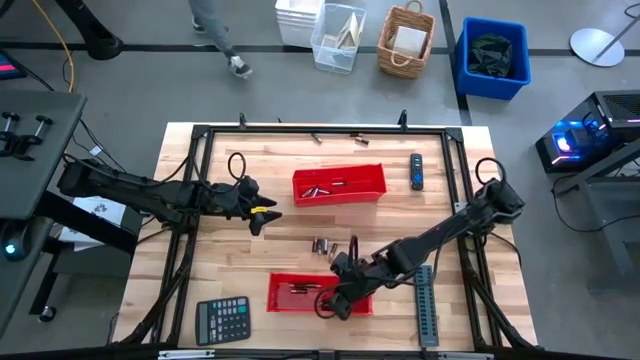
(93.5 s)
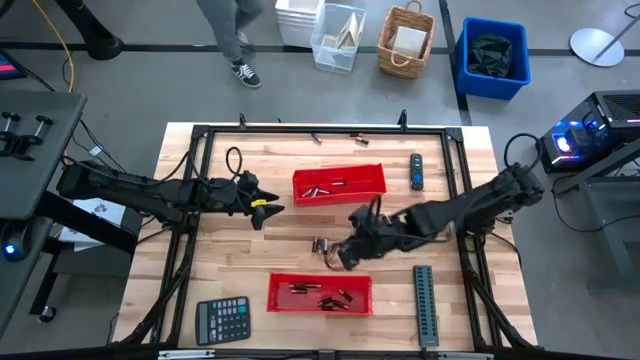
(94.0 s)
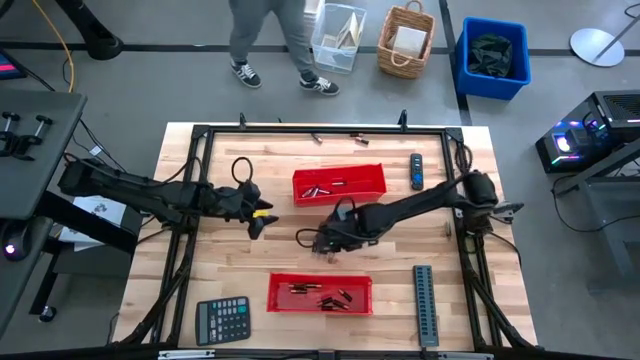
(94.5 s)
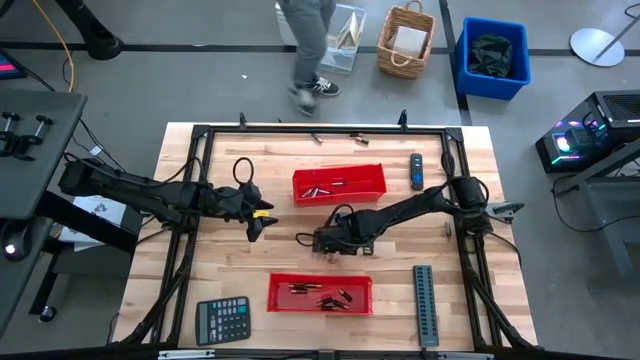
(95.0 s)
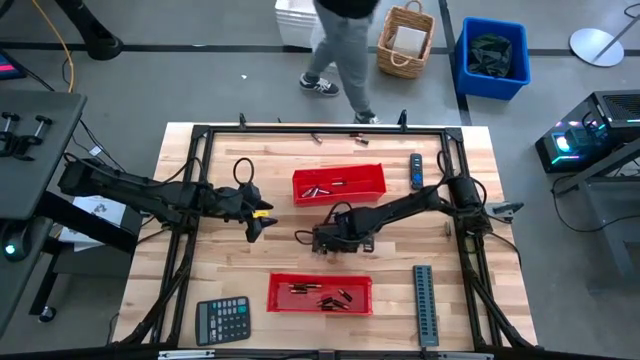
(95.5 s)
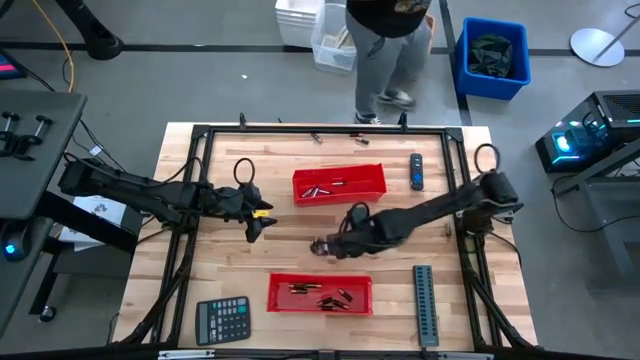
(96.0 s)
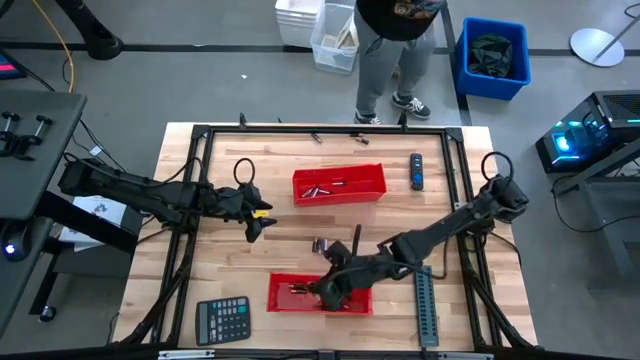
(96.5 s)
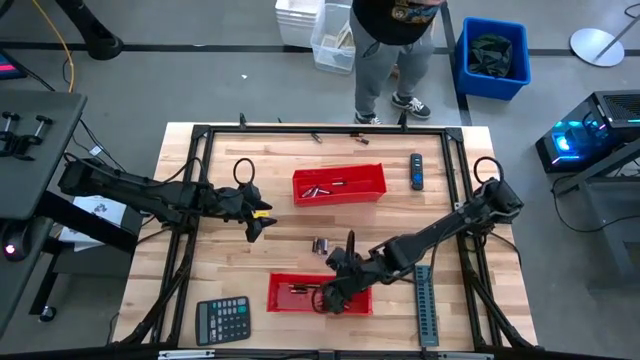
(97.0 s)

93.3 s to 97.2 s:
Task: Sort batteries
Put the black battery into the bottom red bin

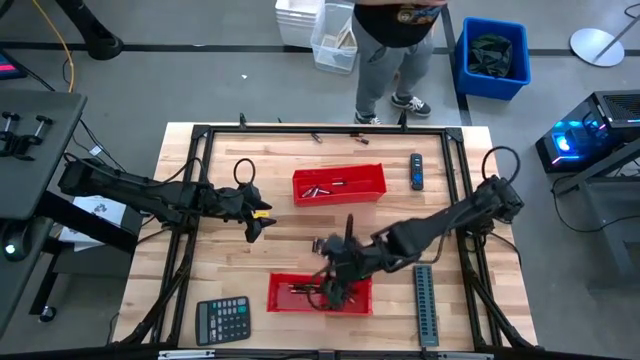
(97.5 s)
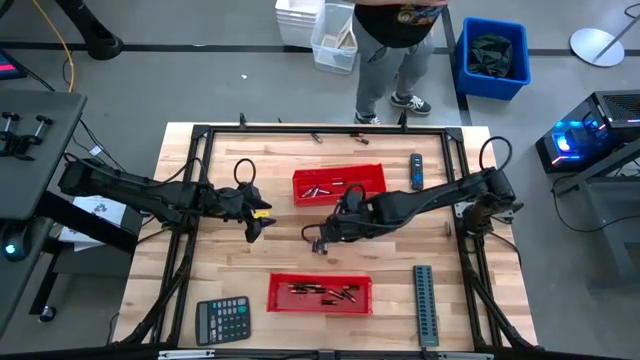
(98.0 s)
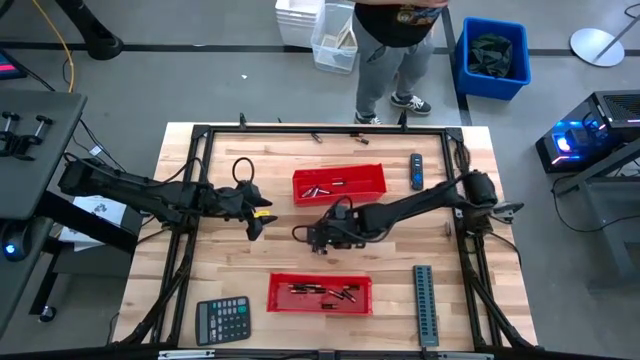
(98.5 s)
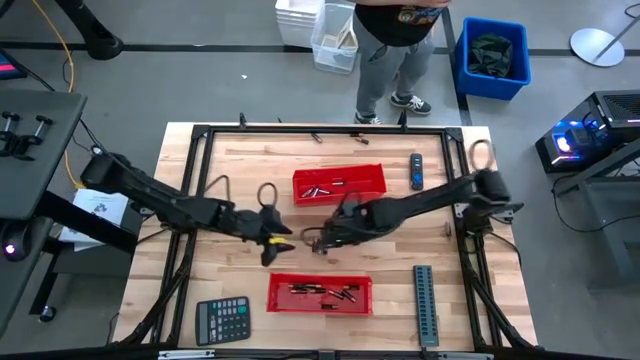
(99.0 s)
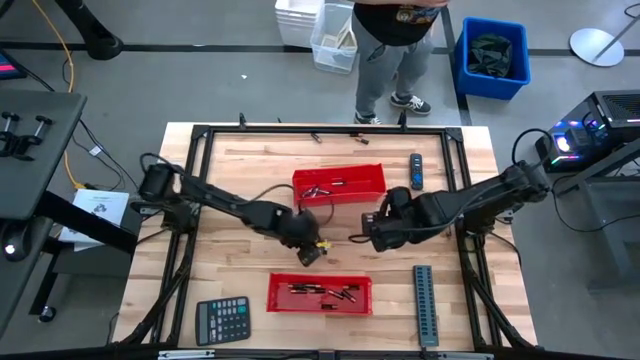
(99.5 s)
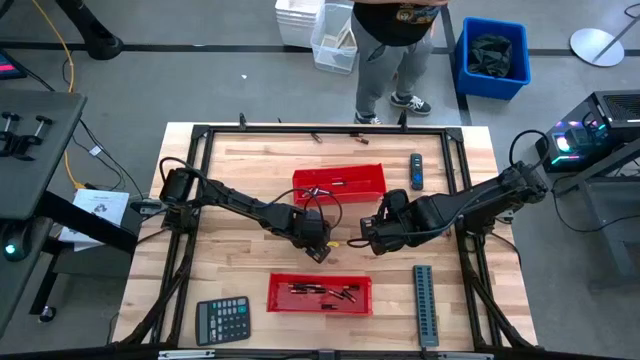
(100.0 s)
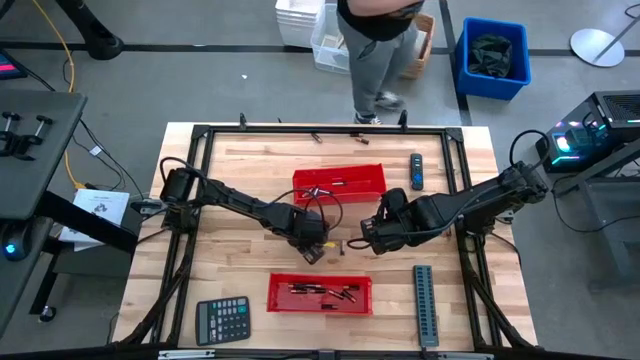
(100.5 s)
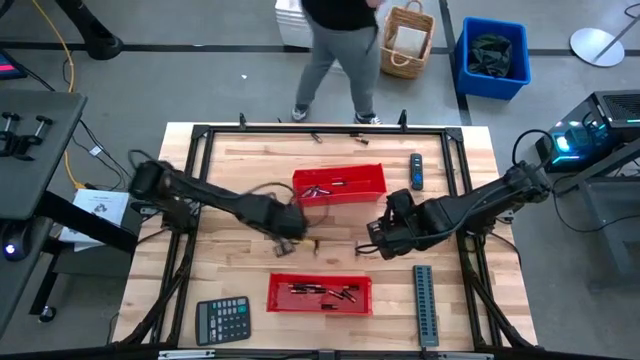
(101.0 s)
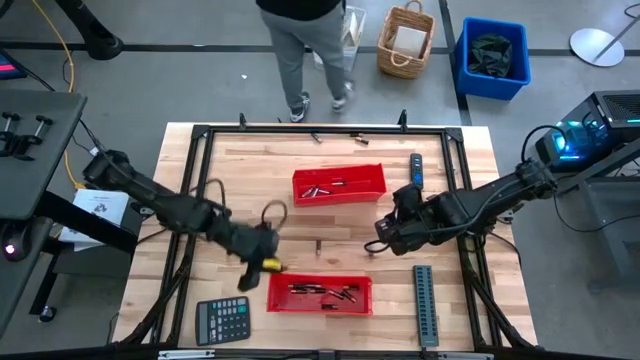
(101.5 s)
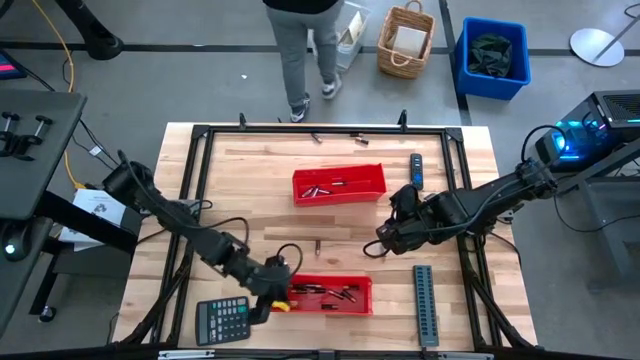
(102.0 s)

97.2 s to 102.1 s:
Put the black battery into the bottom red bin

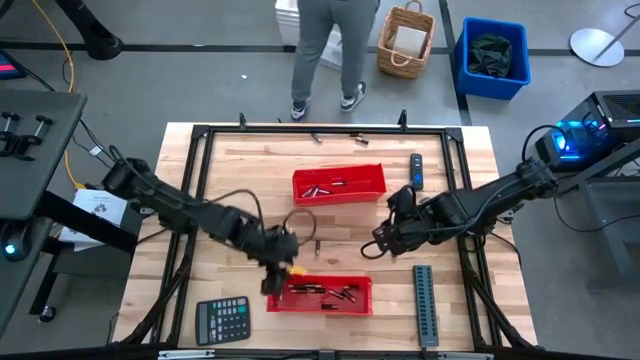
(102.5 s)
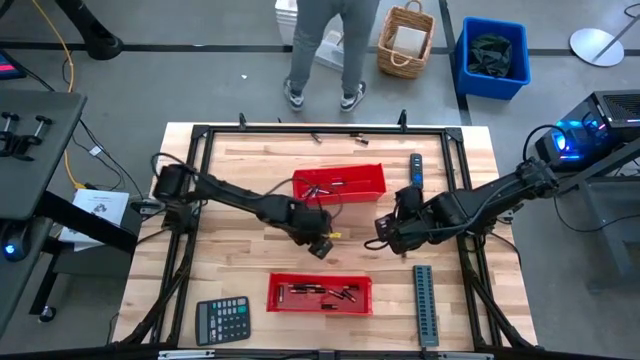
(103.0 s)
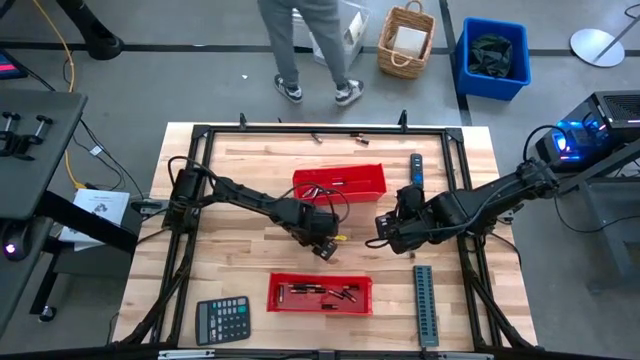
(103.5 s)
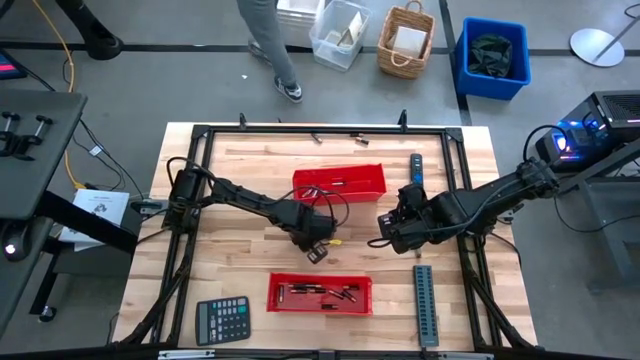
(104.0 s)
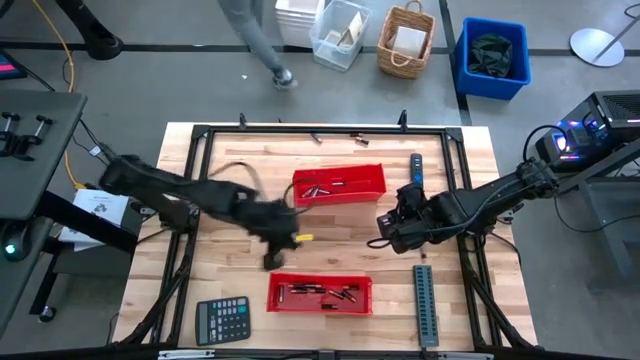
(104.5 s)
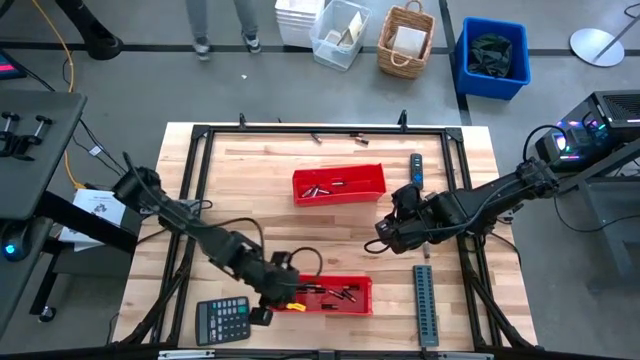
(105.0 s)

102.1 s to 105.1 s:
Put the black battery into the bottom red bin

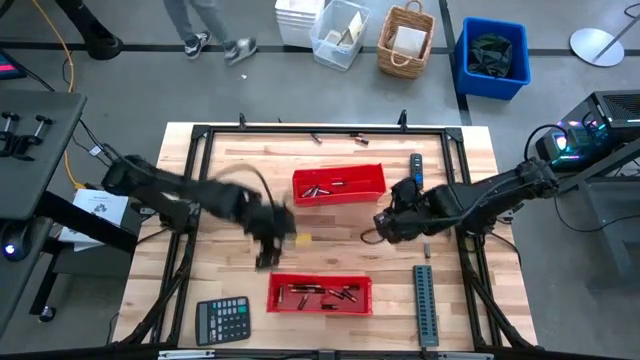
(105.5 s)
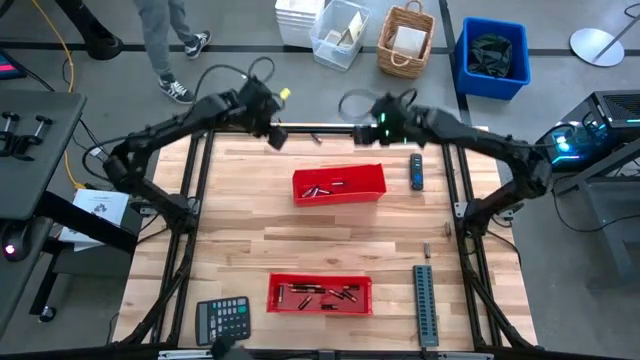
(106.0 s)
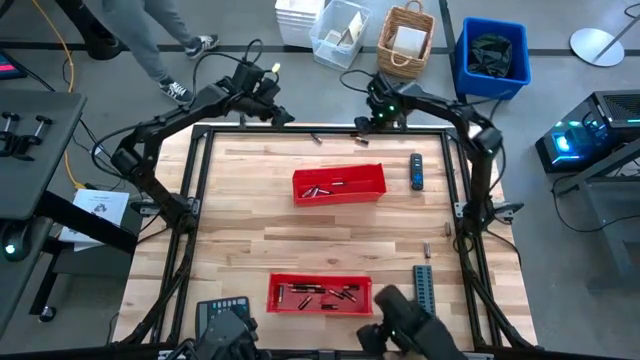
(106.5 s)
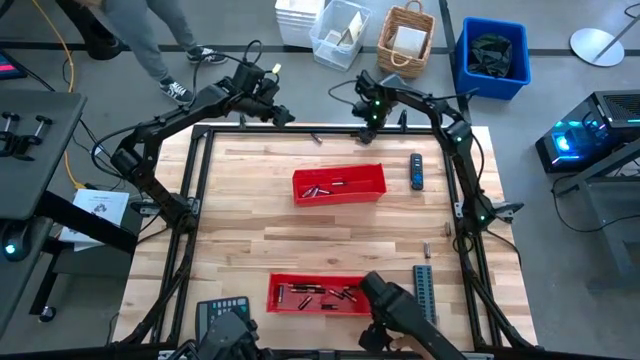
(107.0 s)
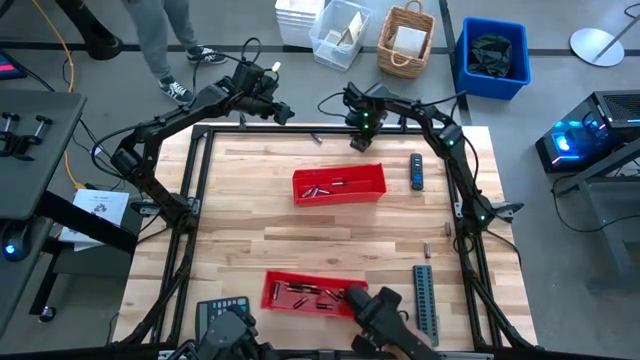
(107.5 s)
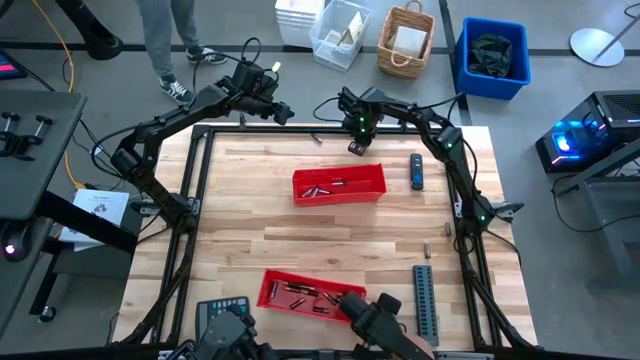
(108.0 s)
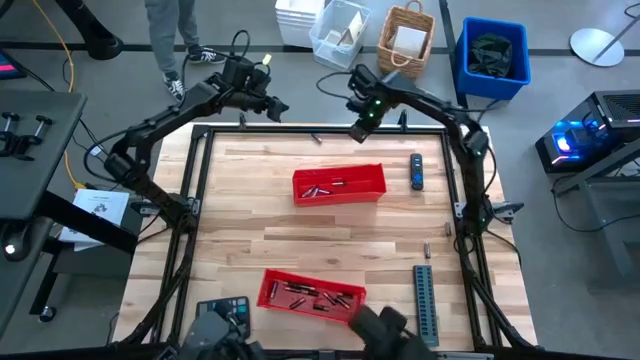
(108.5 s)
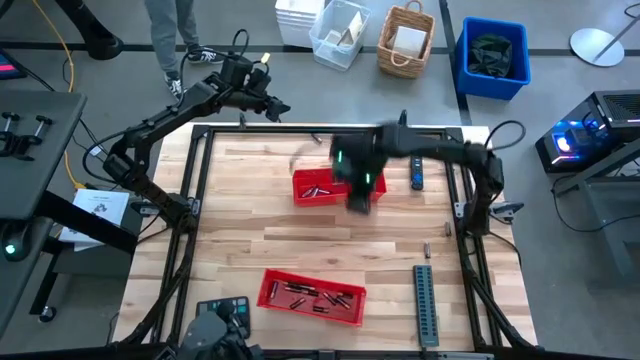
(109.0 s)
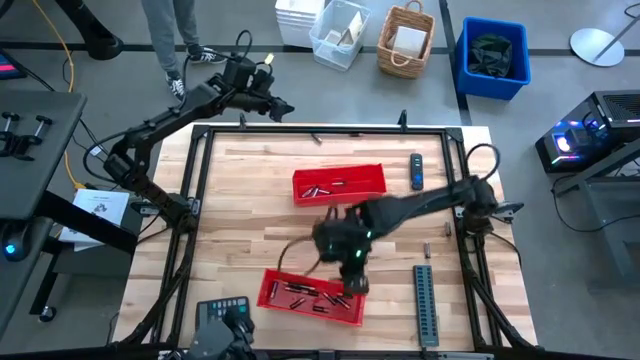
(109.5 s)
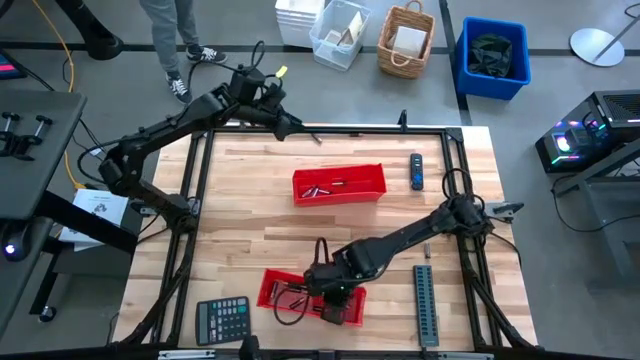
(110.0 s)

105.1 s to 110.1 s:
Put the black battery into the bottom red bin

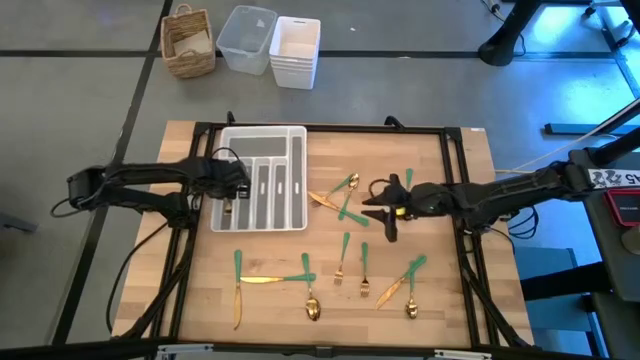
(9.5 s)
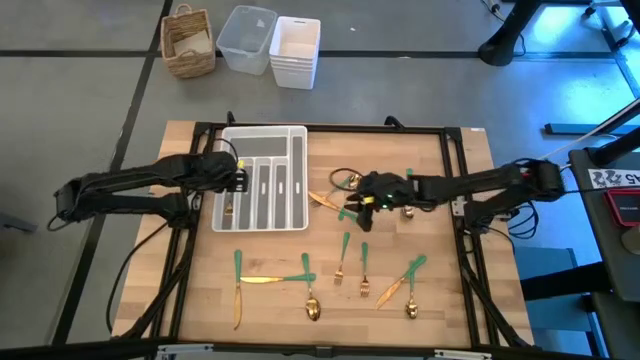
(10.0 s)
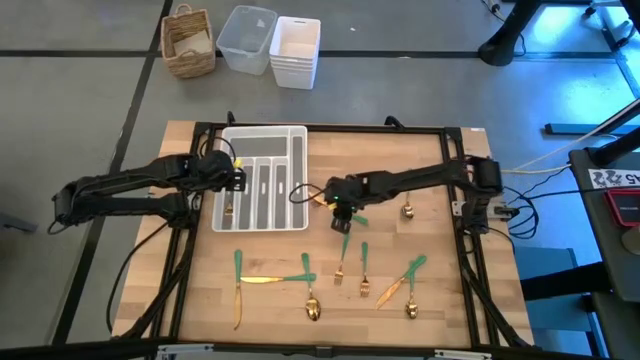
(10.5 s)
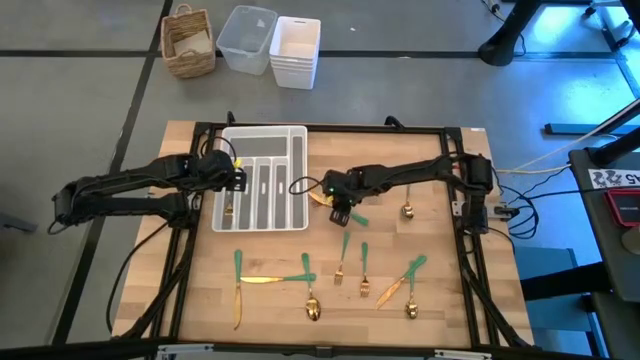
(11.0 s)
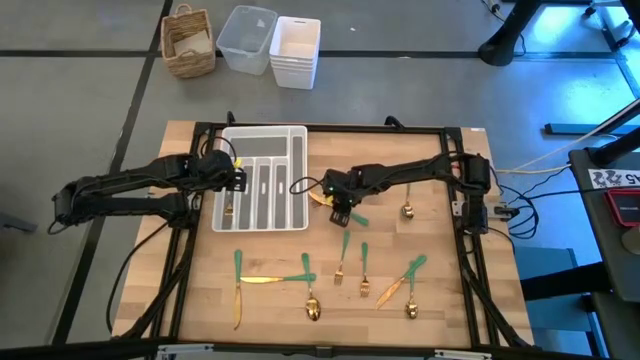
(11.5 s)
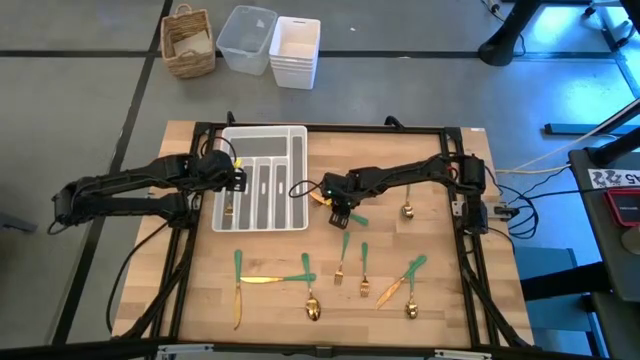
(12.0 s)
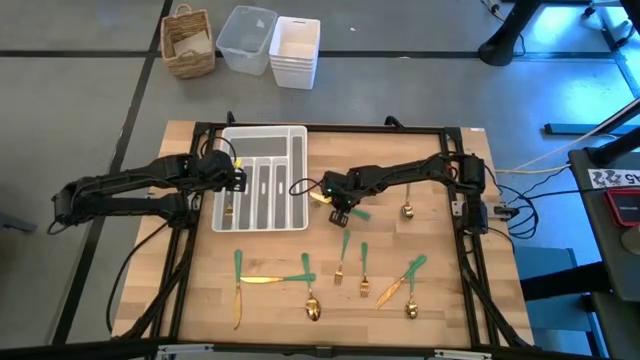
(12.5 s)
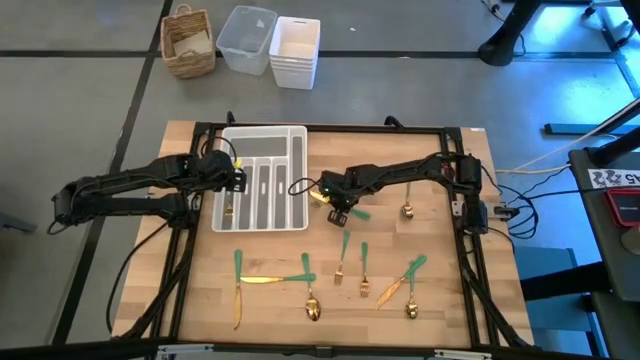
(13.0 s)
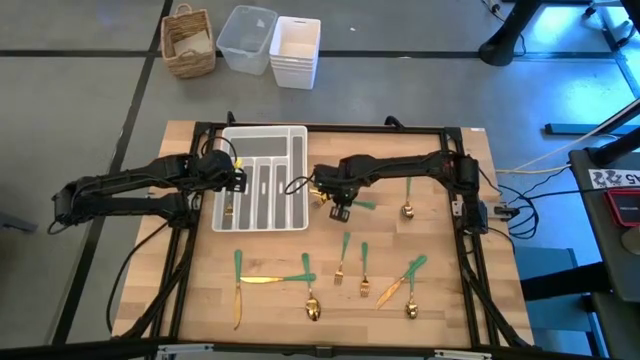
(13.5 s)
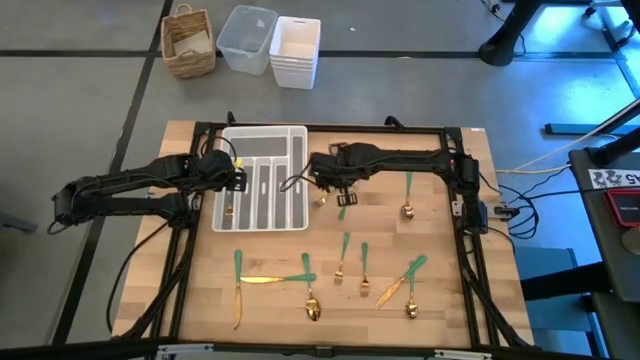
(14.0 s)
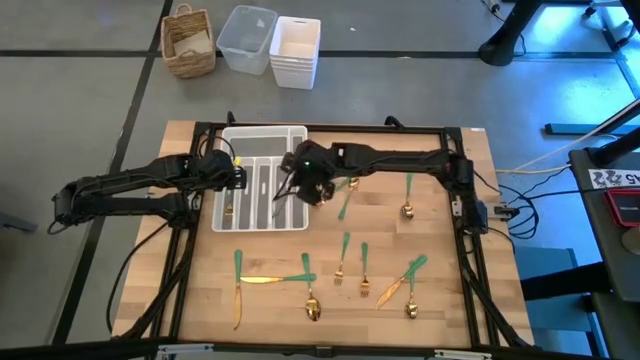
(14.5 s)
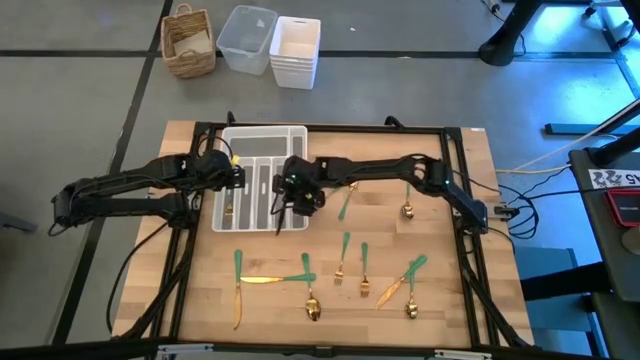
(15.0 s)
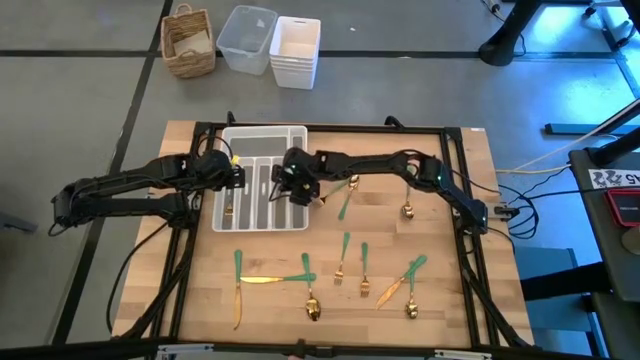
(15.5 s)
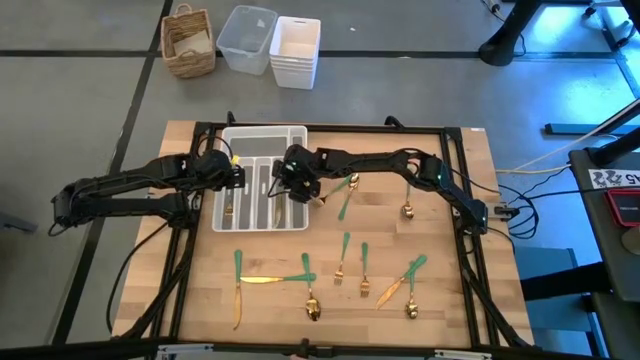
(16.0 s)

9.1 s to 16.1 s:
Task: Sort silverware
Put the green knife into the white silverware tray
